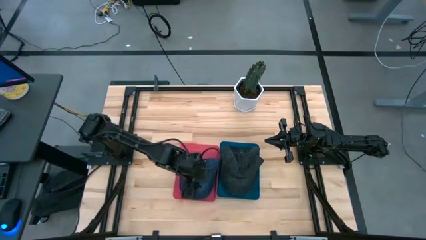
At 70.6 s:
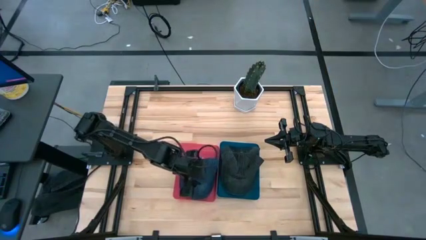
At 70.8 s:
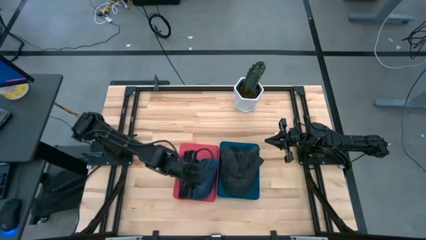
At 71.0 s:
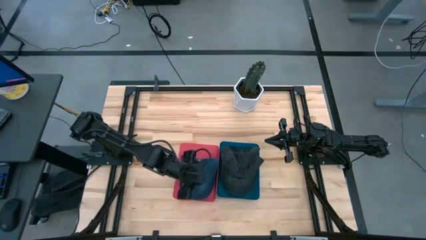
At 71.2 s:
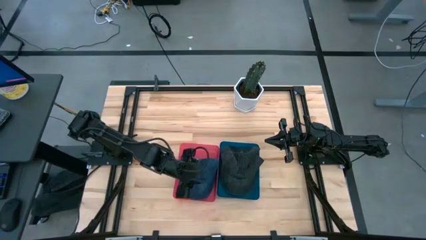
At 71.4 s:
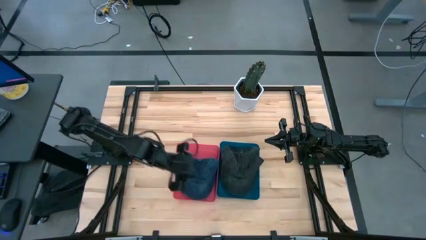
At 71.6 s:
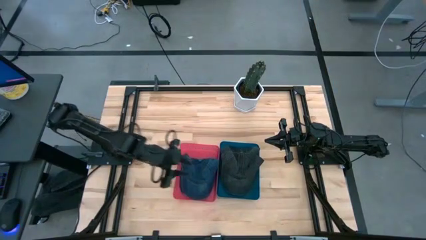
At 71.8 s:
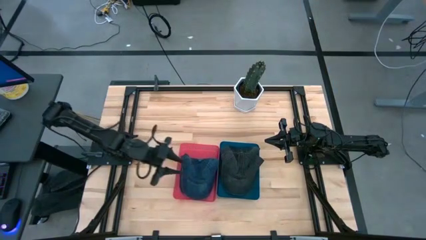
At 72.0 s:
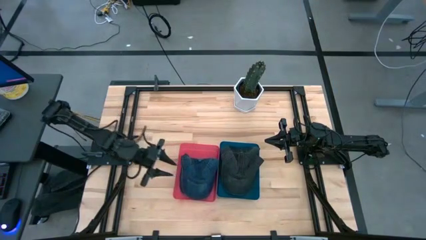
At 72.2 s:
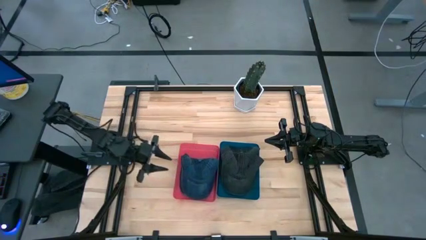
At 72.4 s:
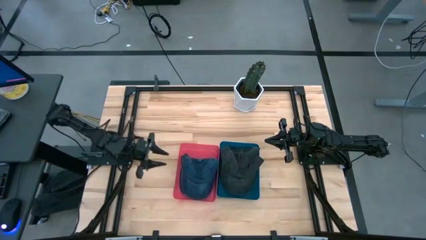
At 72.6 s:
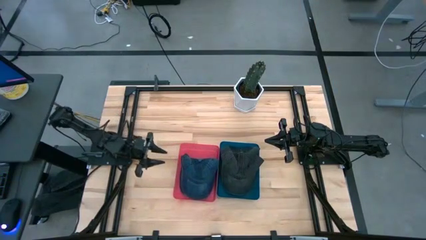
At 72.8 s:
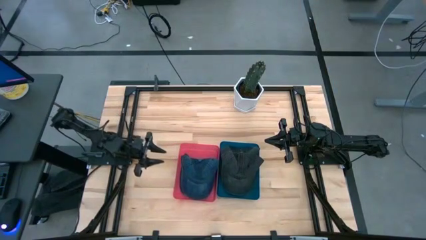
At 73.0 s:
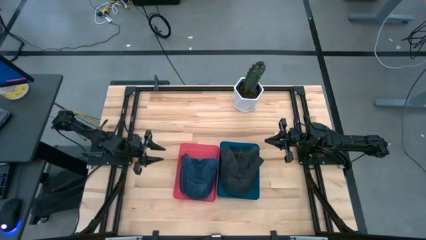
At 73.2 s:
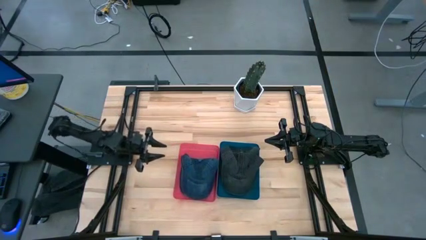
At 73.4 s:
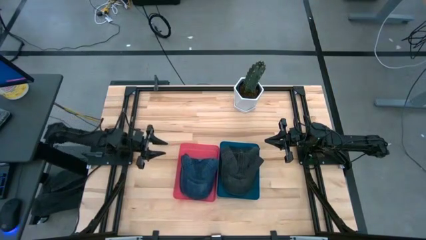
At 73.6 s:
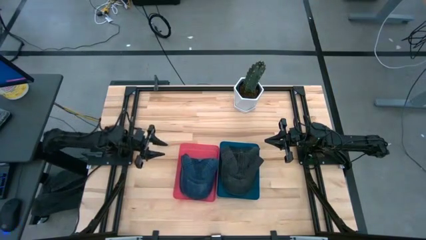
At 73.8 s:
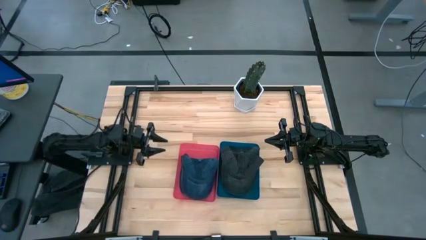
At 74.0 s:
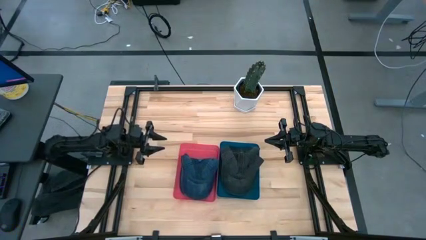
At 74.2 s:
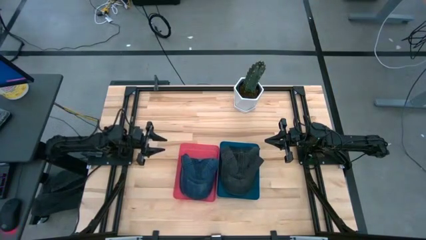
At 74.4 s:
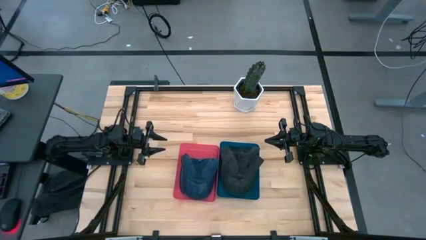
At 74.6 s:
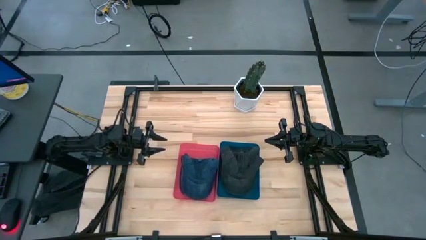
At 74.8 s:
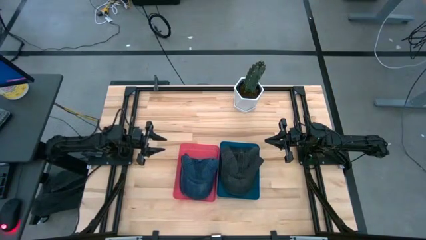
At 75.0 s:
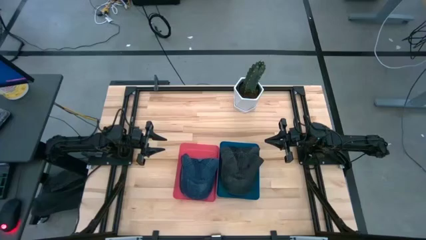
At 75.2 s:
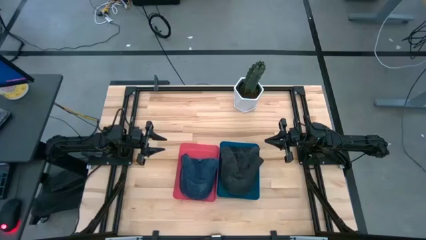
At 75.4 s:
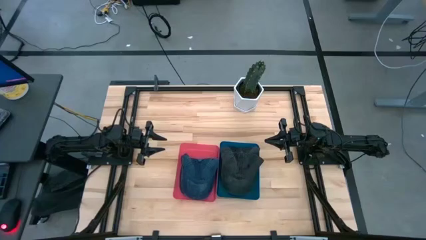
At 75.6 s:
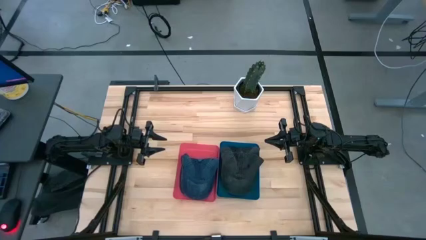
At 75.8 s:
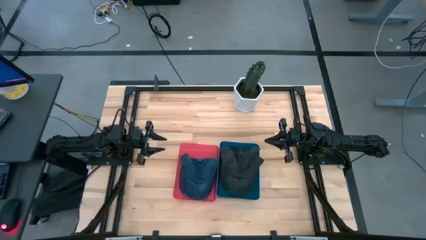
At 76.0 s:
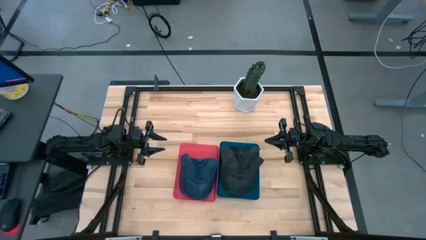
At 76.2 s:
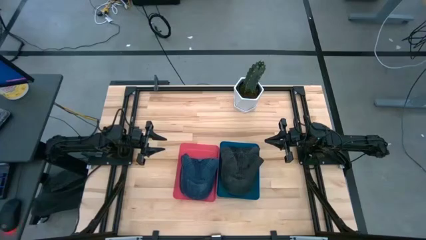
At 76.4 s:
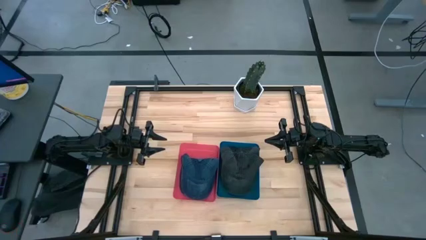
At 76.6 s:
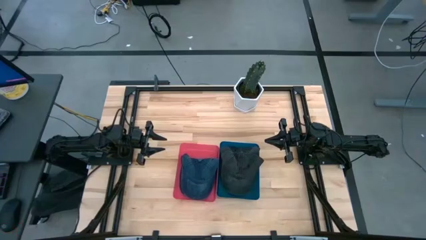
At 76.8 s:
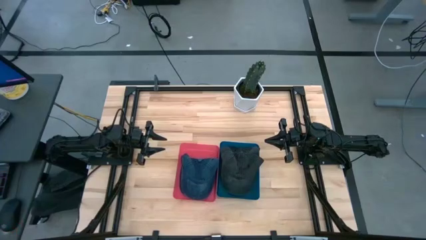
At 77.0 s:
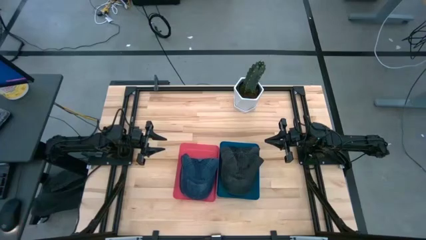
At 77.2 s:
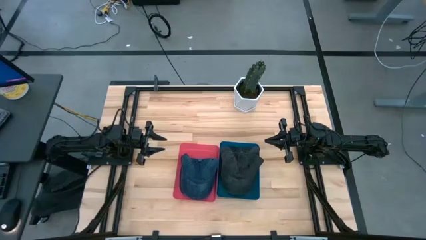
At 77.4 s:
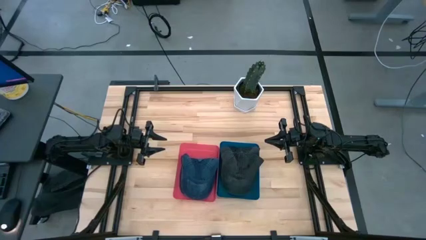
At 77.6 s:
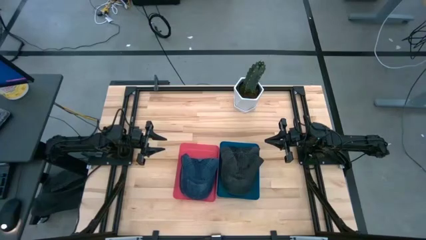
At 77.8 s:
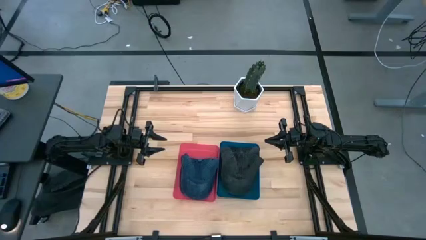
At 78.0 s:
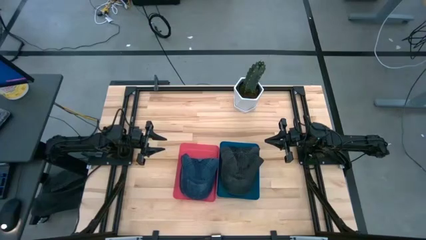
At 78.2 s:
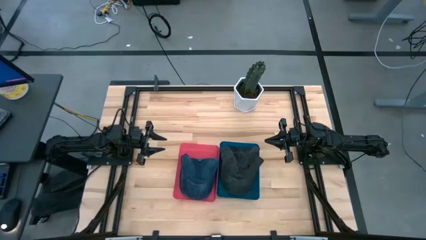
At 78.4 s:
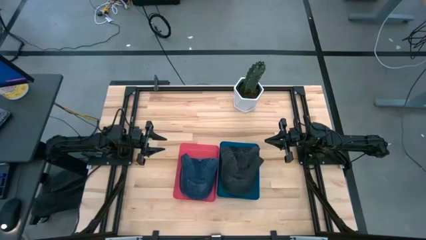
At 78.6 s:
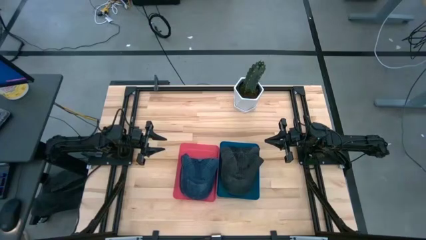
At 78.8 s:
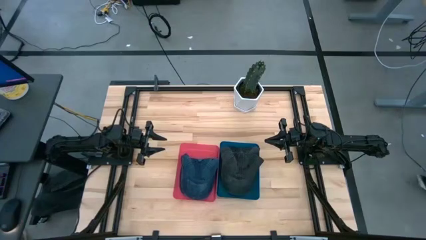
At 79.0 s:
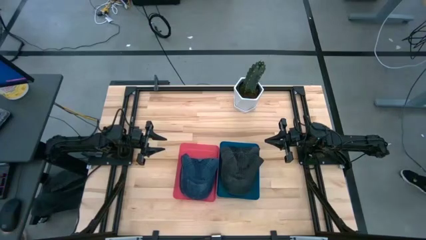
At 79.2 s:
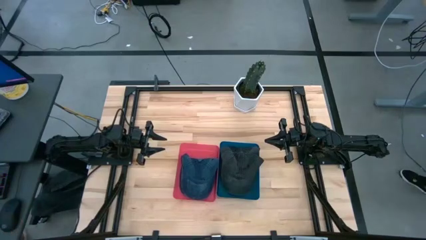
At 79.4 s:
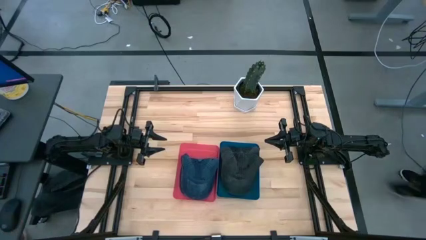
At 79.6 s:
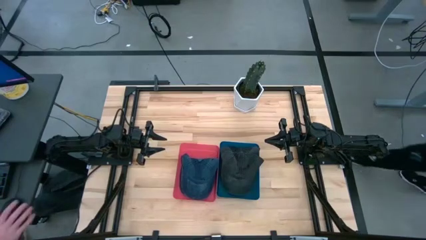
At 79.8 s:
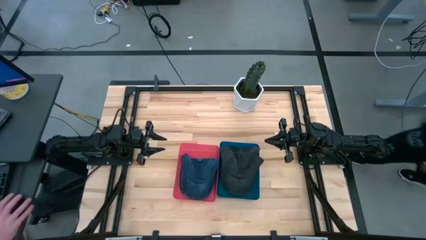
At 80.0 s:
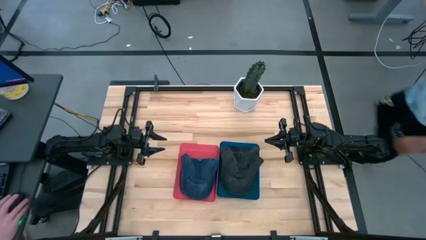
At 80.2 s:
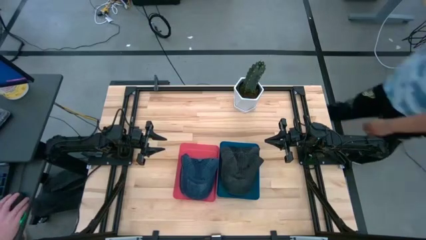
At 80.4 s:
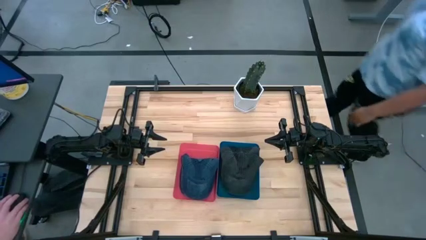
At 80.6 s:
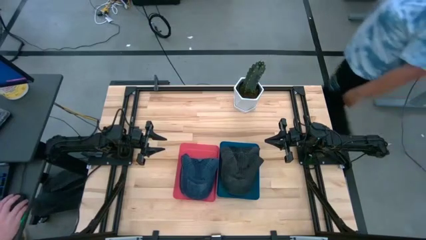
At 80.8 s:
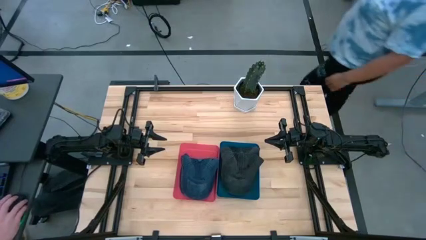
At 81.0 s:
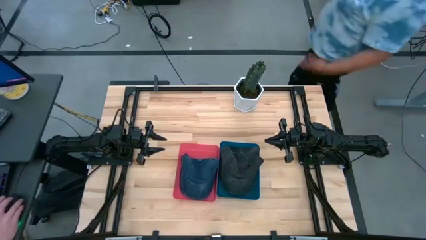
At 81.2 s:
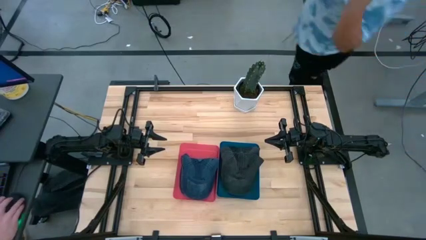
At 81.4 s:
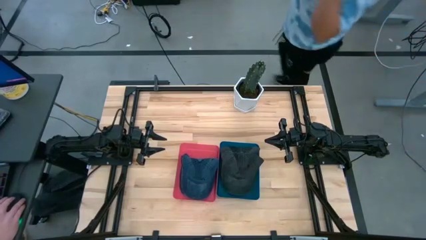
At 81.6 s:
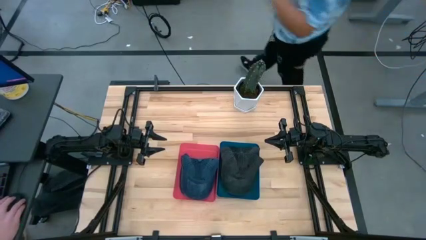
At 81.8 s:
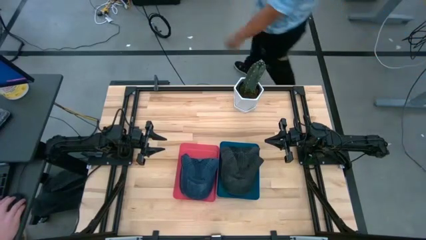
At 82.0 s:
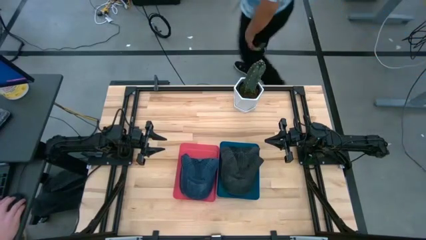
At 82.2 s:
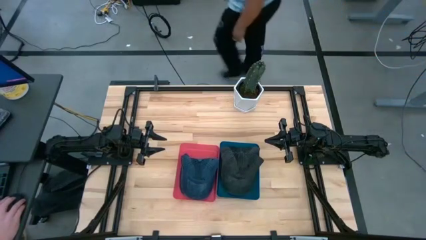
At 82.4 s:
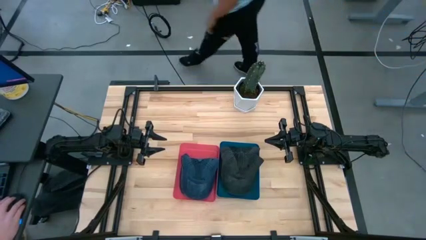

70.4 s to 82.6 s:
Task: Pick & Place hat
Return to Home Position

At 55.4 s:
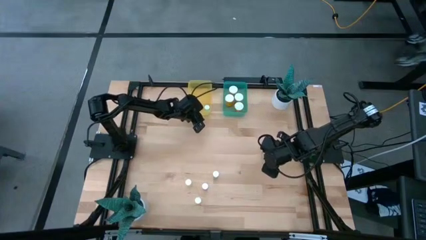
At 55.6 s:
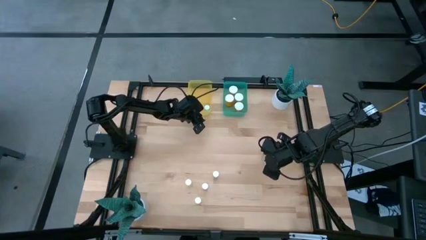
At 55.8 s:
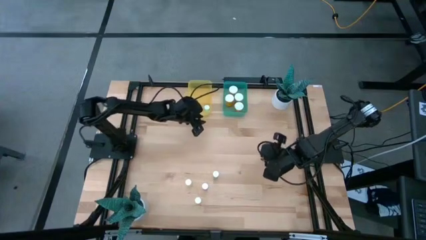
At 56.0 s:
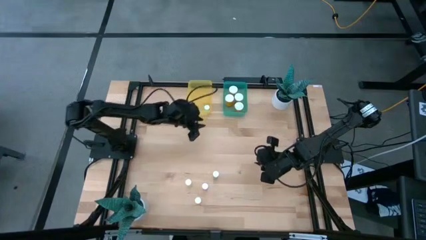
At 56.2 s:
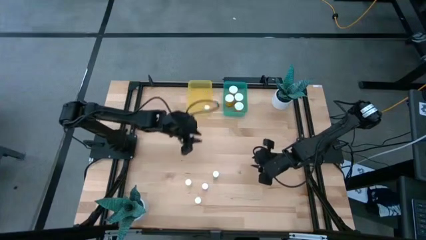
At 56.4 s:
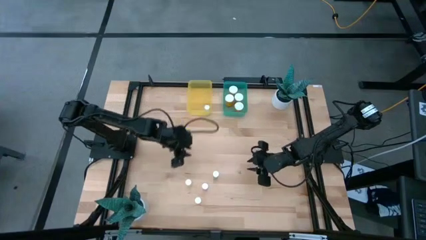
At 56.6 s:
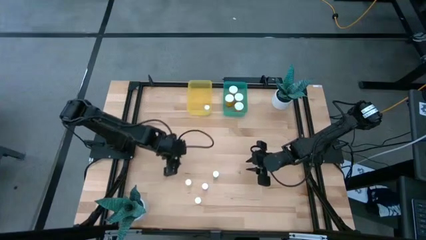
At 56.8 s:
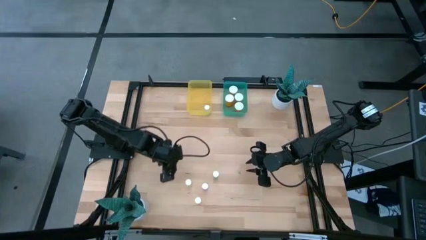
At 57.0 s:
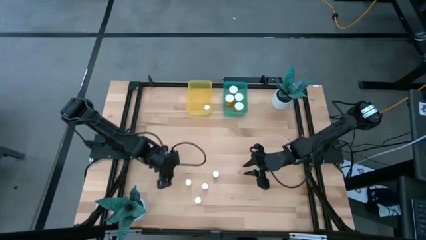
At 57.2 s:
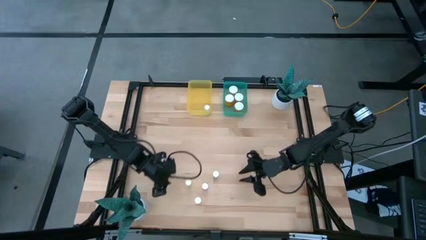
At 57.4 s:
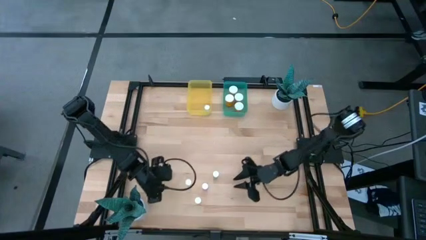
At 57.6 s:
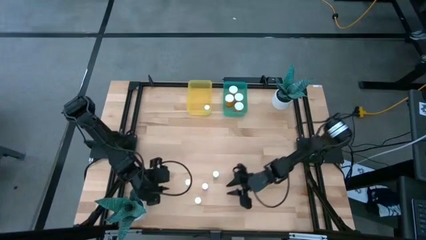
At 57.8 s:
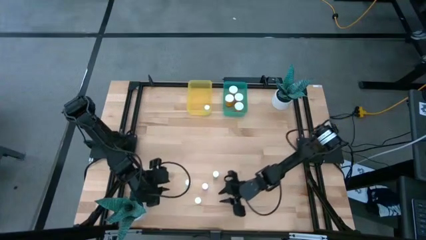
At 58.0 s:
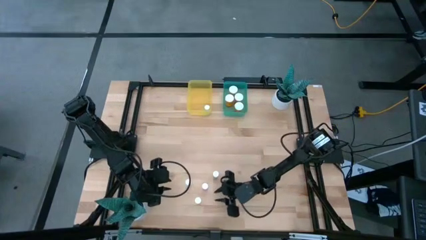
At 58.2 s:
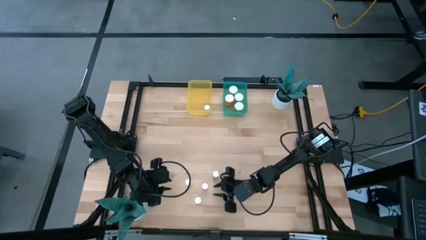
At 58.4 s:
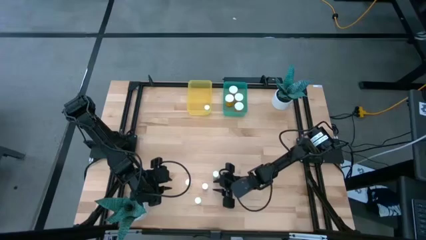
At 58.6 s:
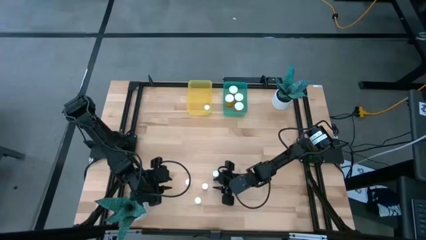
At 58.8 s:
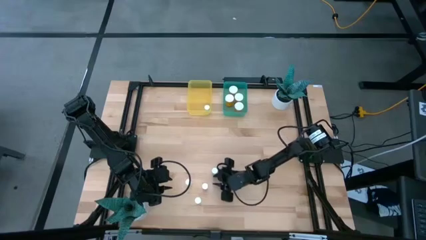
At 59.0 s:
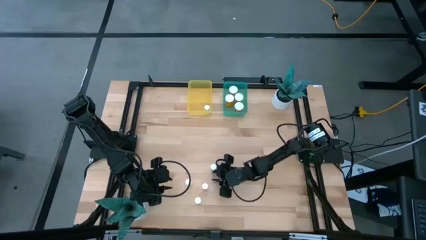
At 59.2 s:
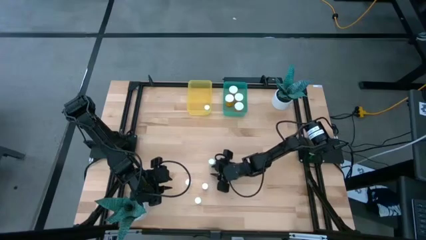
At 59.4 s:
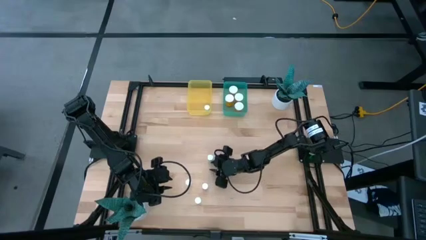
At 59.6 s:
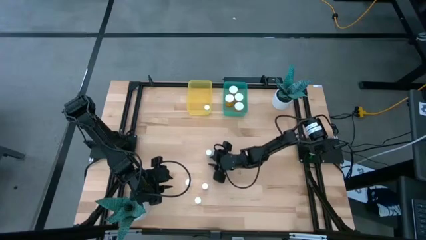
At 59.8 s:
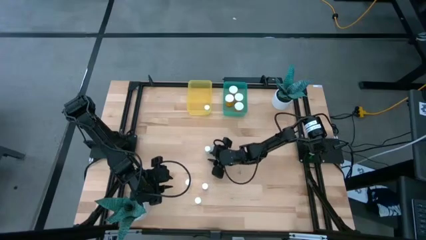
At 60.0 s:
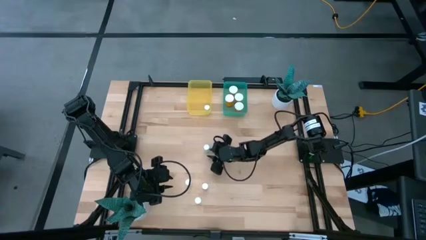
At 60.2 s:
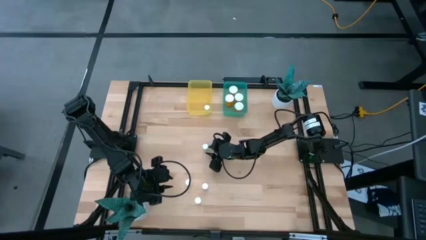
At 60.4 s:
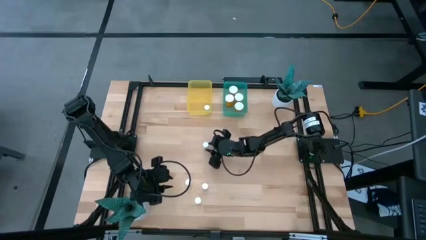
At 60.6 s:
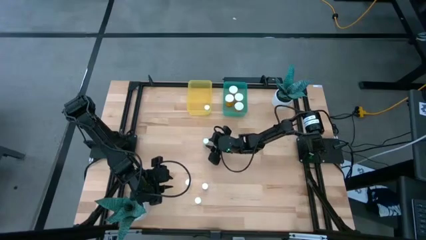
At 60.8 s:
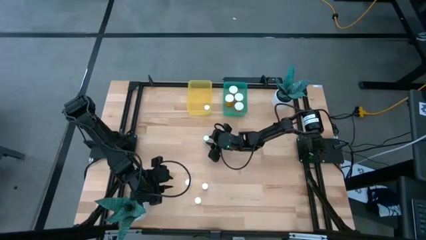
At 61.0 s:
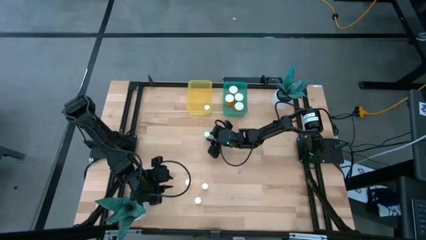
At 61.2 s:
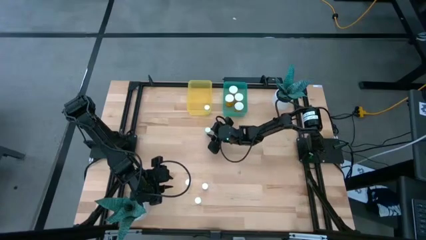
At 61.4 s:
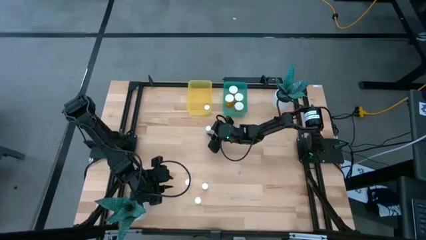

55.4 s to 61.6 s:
Task: Pick and place medicine bottles into bin by pill shape (circle, oval)
Move the green tablet bottle to the top of the table
